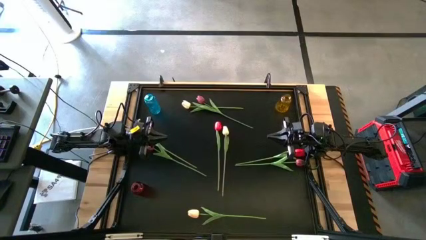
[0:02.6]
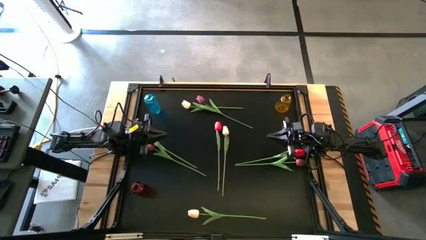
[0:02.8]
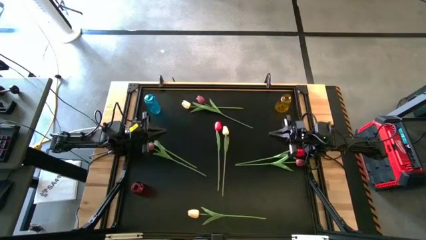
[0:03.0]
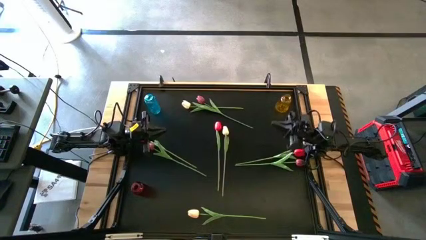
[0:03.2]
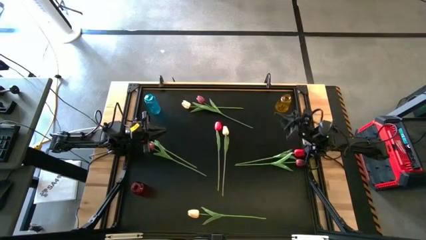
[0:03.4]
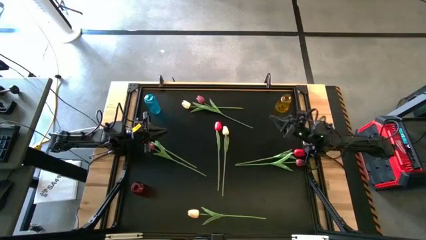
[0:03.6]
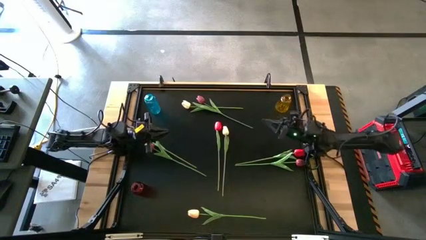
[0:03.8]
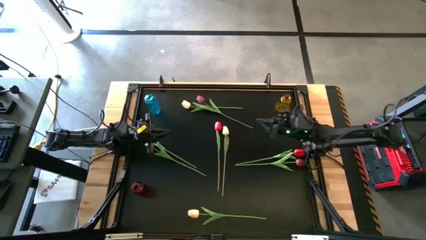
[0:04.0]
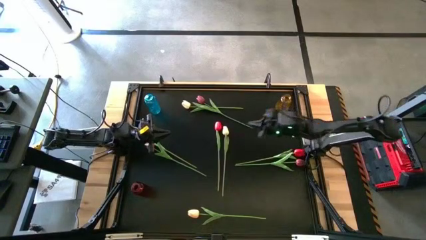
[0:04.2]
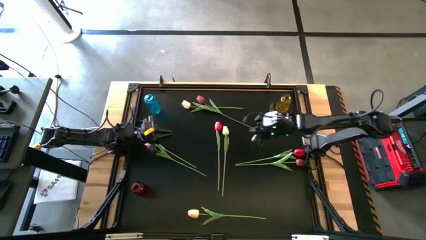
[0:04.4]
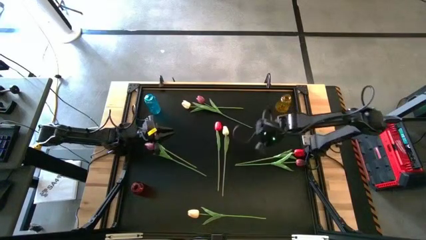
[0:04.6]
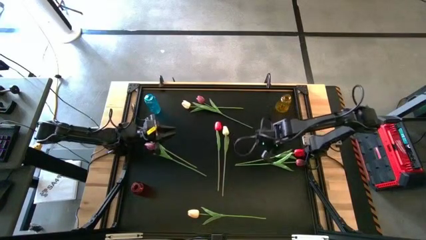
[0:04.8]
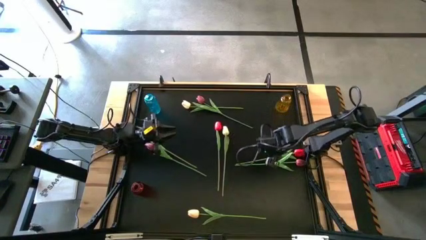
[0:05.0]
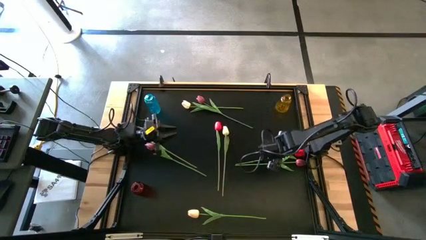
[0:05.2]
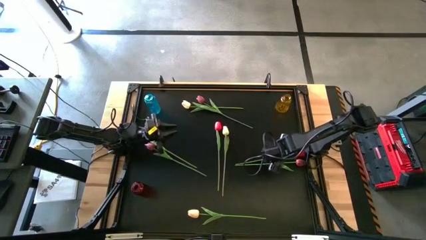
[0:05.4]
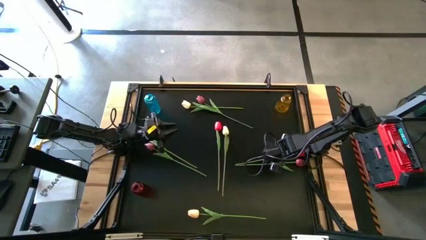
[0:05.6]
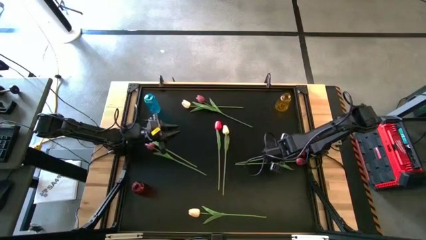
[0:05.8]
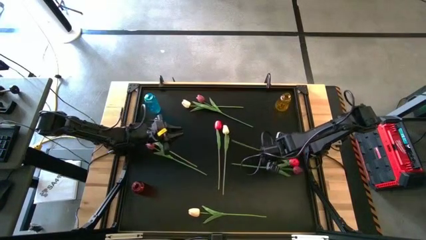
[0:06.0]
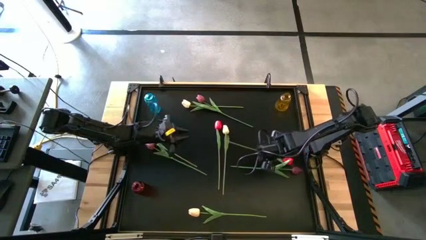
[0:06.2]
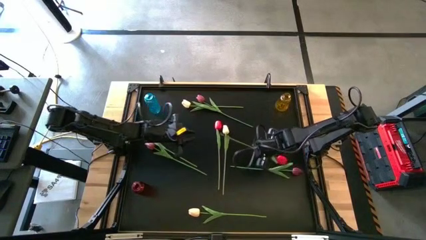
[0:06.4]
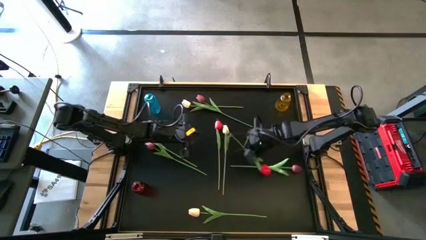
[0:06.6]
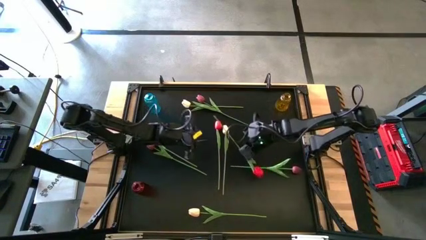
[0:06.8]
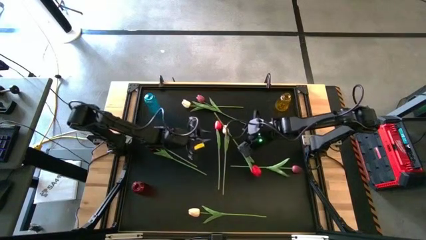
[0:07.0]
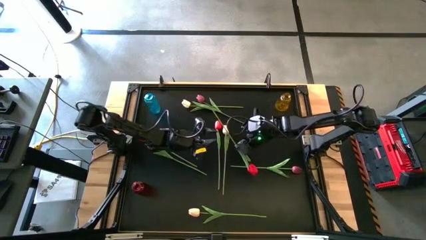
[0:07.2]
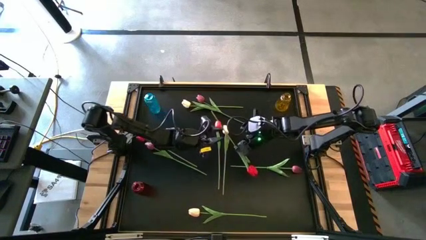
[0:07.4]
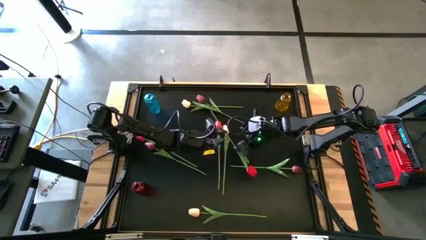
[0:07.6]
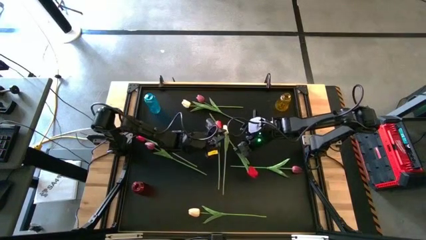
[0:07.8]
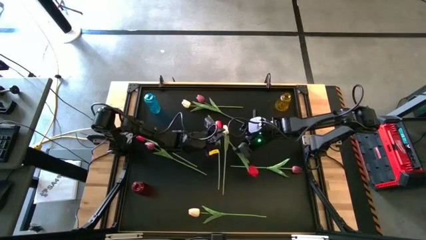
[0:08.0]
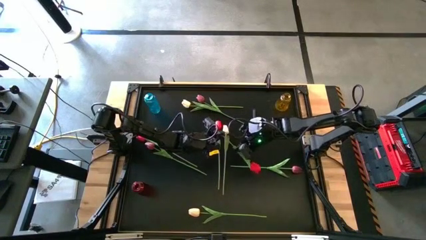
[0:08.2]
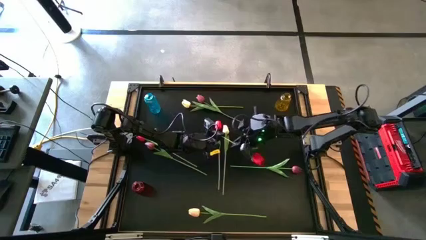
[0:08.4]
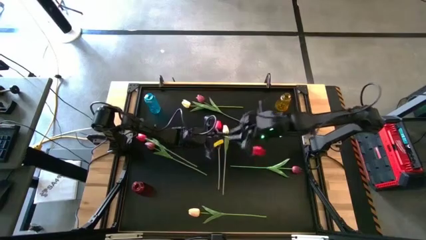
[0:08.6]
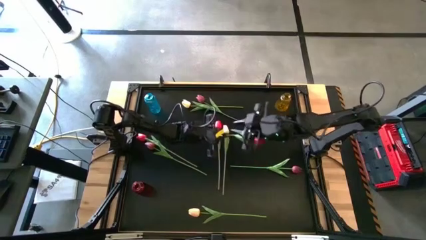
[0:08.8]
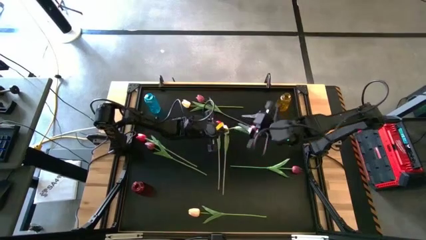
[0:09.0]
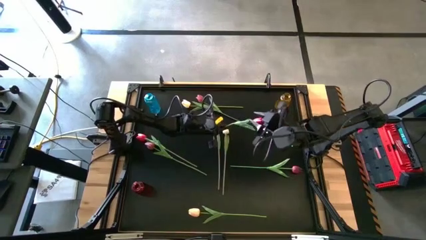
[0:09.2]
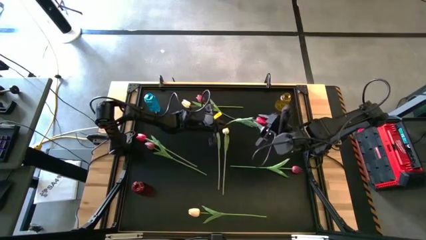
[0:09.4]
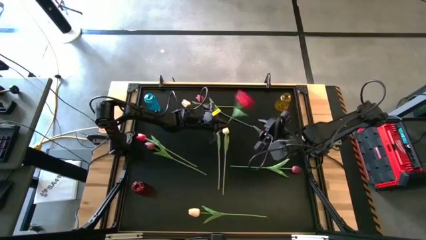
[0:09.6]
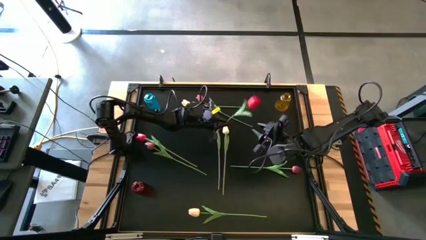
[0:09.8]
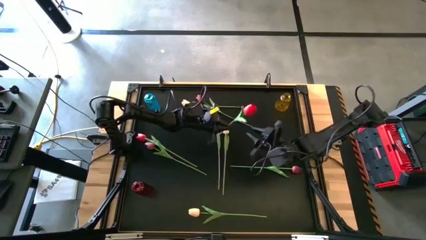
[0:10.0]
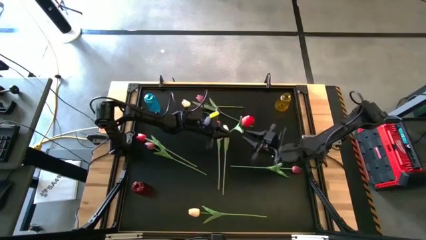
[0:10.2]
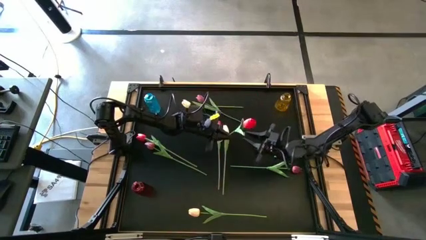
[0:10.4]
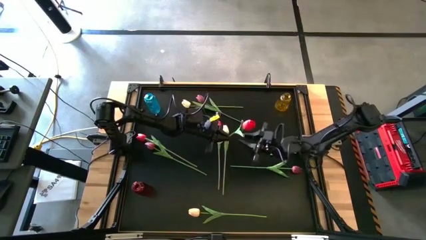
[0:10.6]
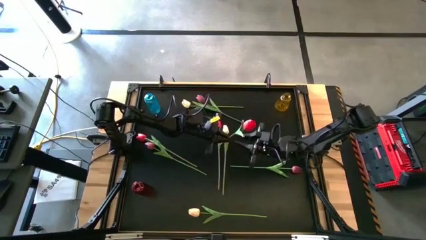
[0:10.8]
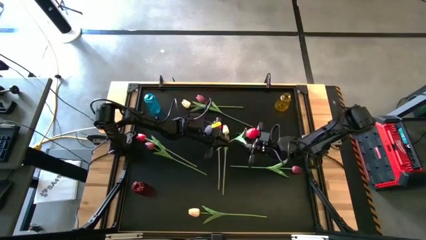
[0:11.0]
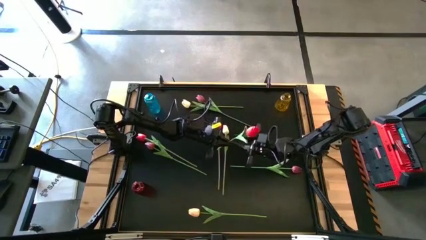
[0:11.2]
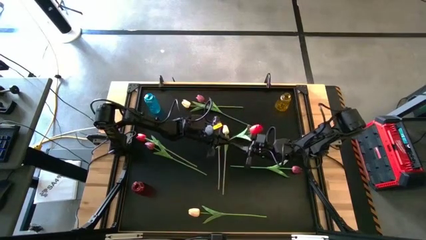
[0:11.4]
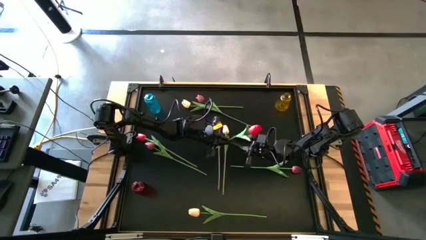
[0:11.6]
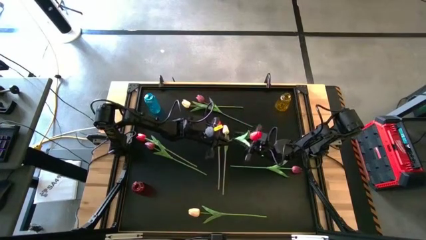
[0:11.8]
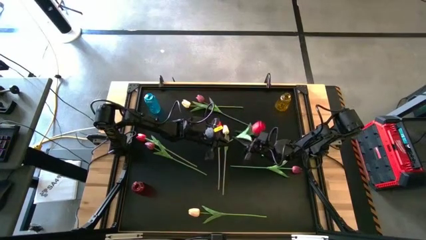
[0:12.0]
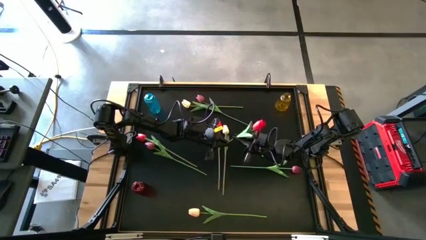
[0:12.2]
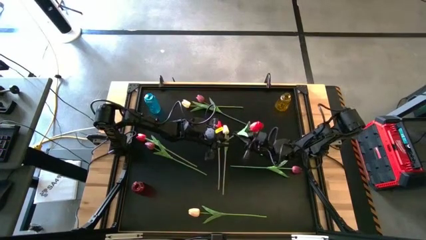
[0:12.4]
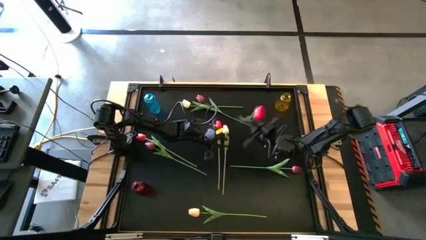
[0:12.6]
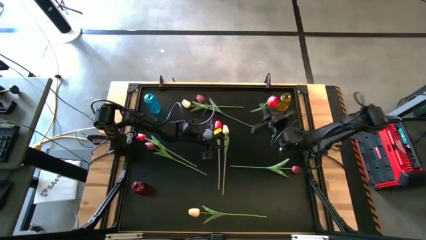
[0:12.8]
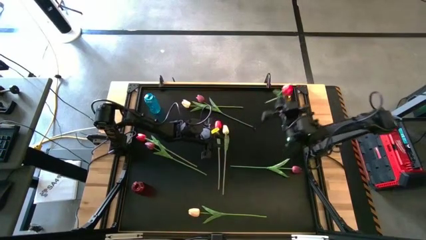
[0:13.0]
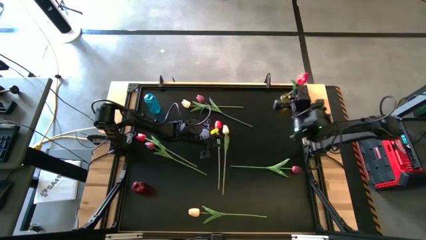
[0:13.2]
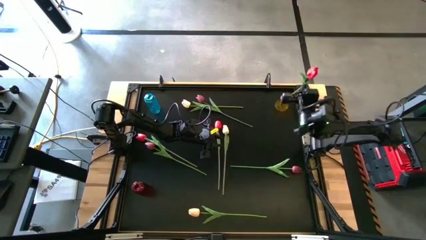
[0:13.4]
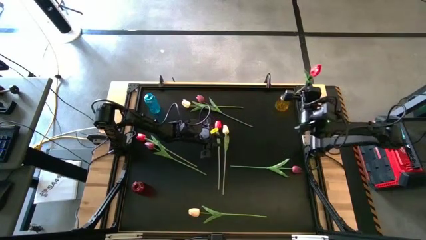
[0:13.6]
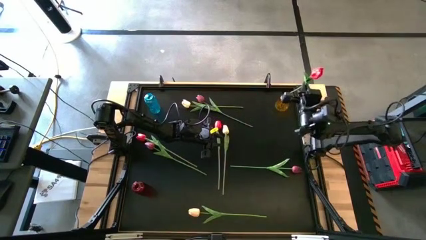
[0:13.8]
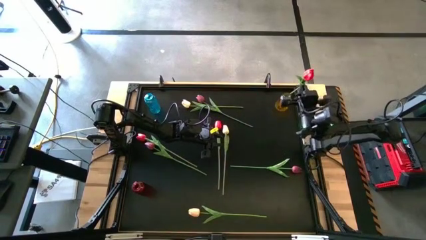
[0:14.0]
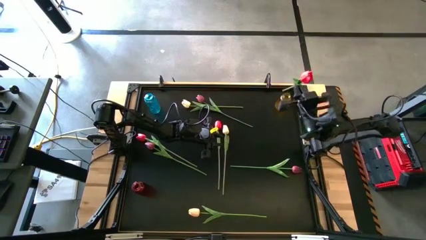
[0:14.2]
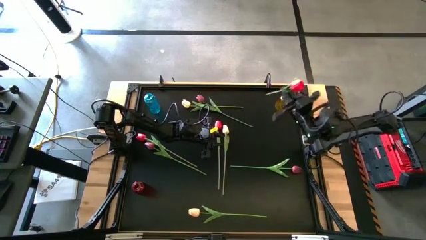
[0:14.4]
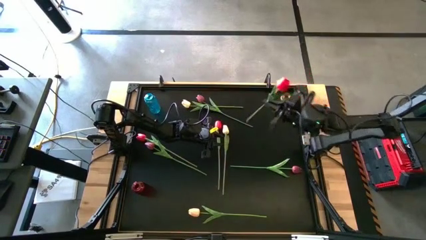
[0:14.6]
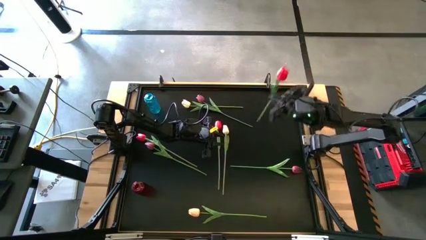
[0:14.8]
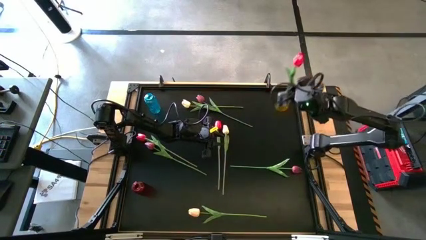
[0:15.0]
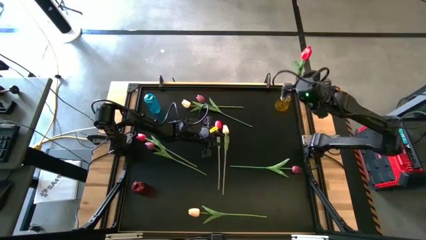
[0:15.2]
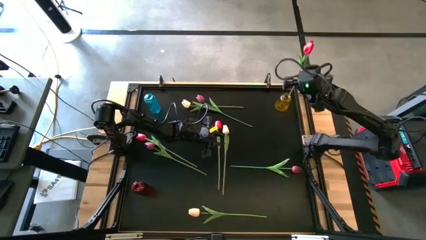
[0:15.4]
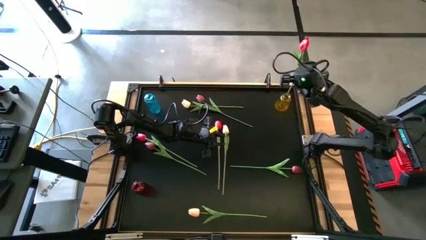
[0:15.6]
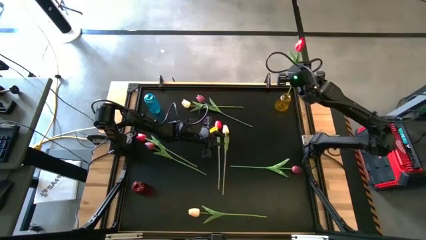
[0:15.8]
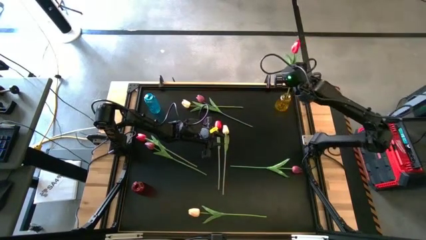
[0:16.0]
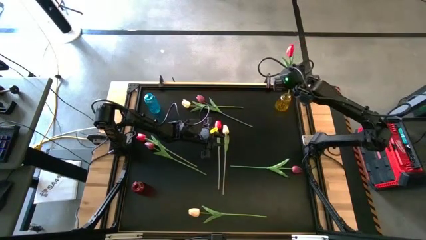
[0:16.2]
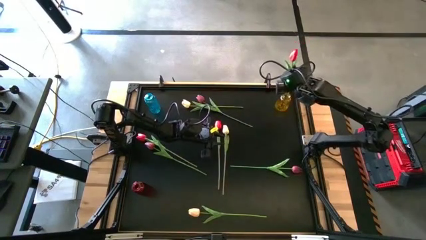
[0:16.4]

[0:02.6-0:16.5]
Task: Sort flowers into vase by color
Put the right red tulip into the yellow vase
